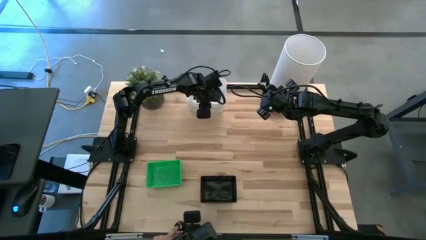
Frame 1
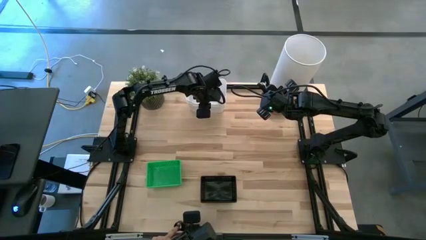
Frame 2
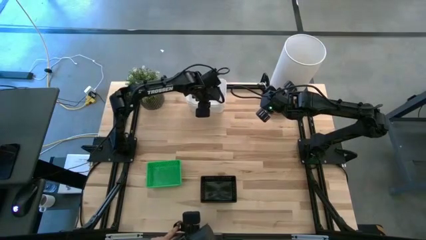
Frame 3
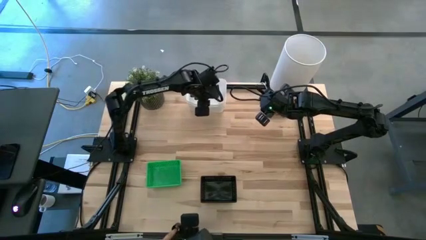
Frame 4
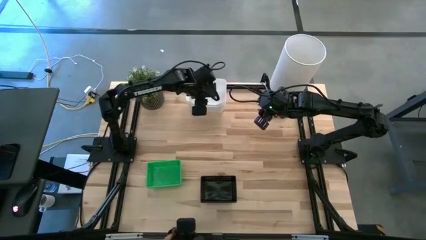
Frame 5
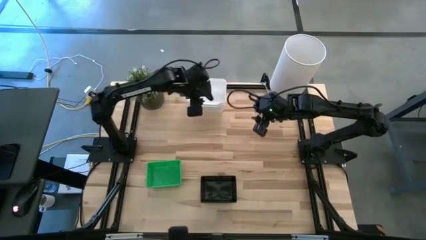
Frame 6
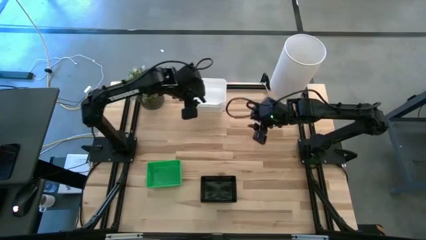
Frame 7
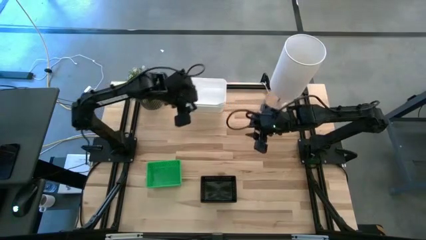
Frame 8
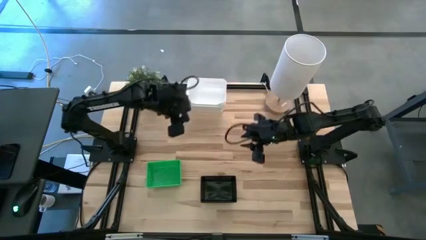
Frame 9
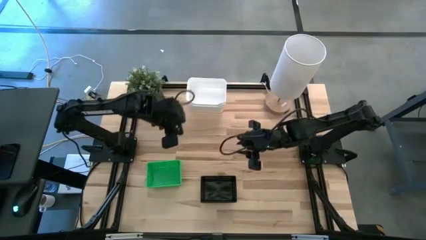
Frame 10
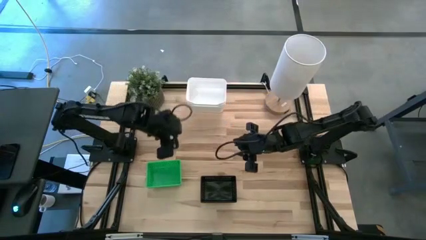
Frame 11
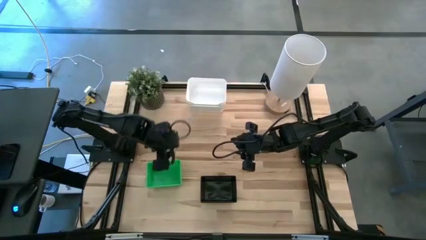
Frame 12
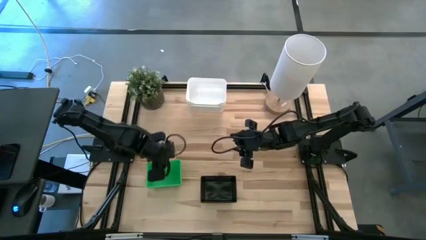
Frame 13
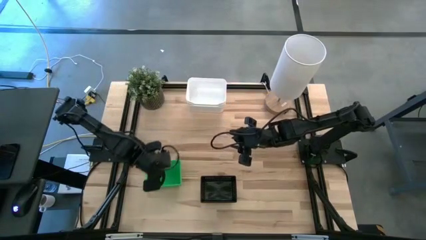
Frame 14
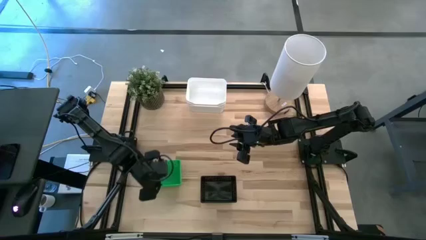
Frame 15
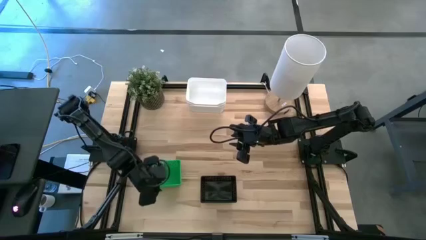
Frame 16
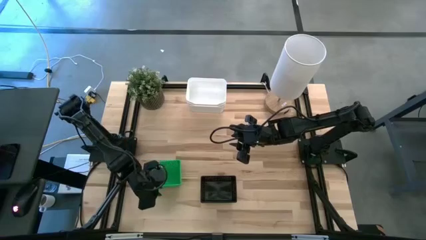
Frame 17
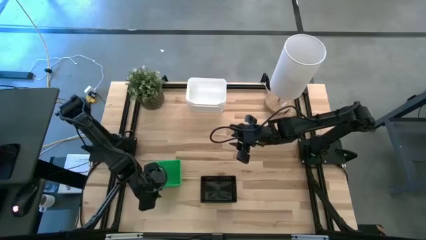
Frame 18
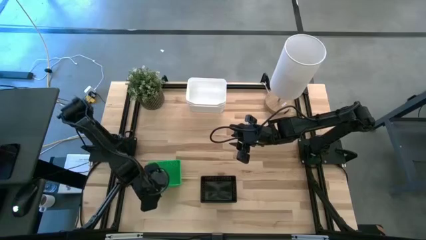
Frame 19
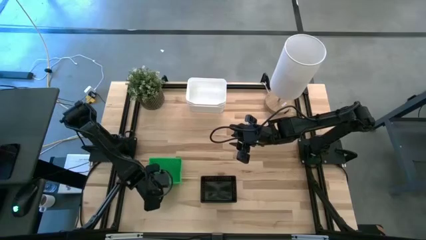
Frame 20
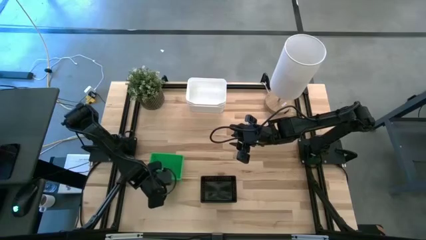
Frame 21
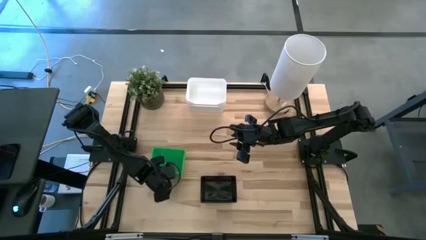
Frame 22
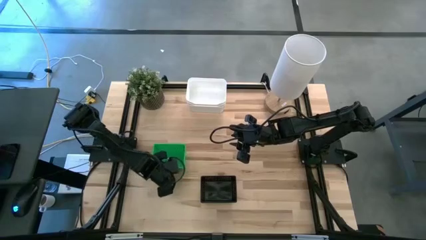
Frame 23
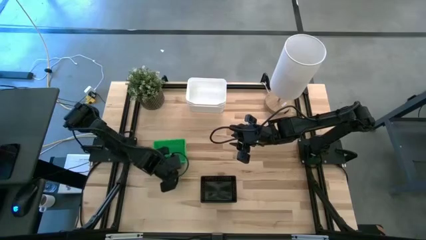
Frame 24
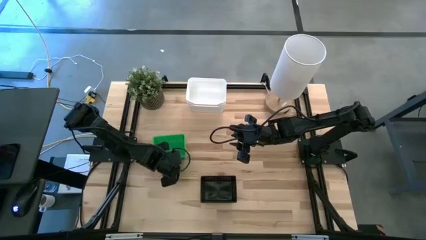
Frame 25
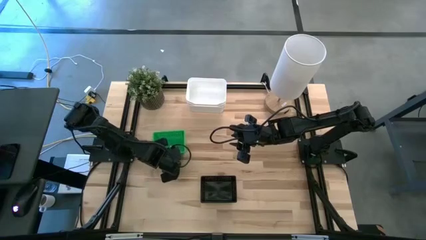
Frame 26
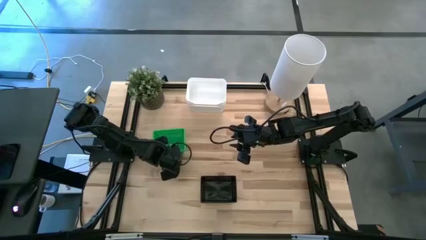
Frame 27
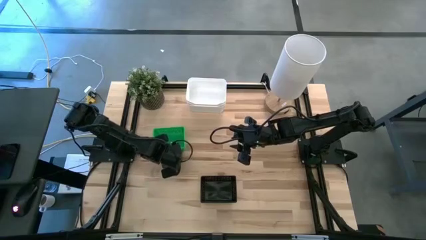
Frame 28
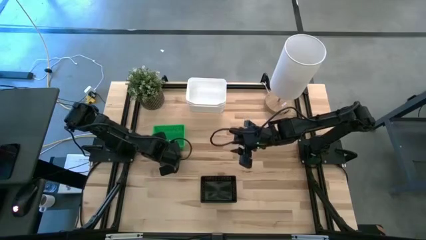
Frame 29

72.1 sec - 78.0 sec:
Move the stacked green bins to the middle left of the table

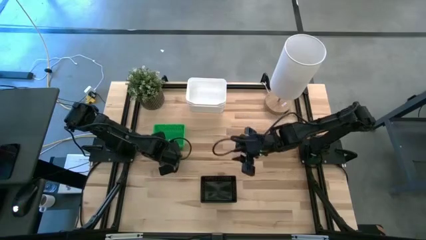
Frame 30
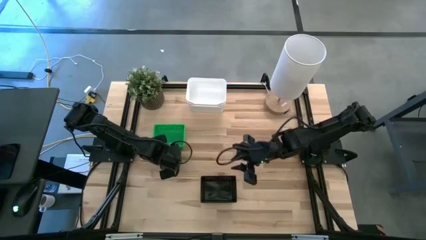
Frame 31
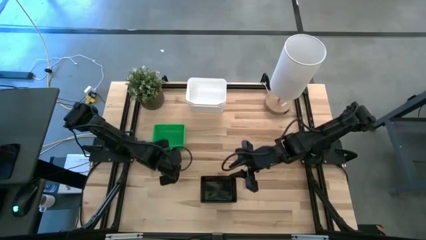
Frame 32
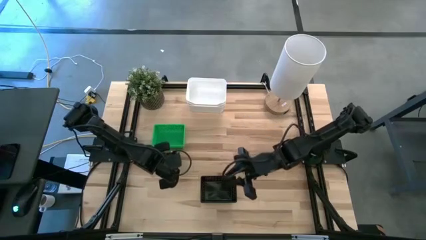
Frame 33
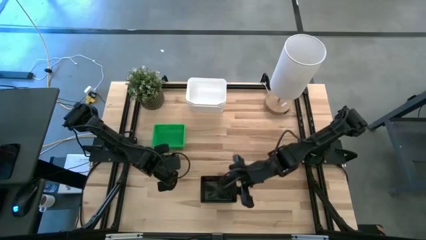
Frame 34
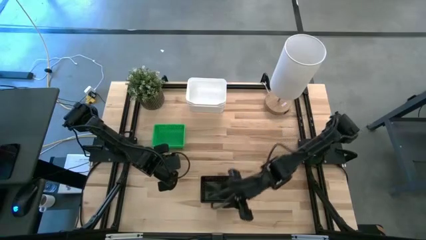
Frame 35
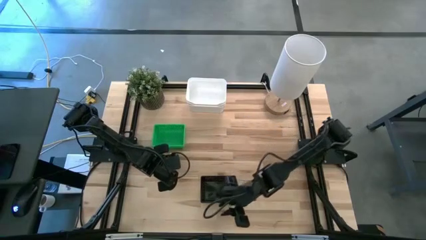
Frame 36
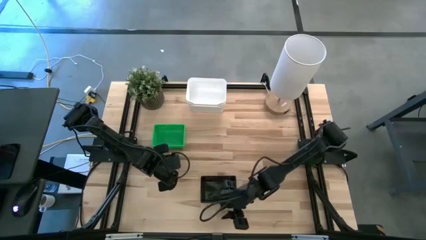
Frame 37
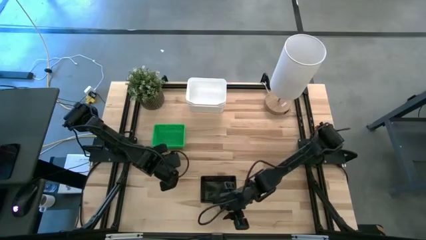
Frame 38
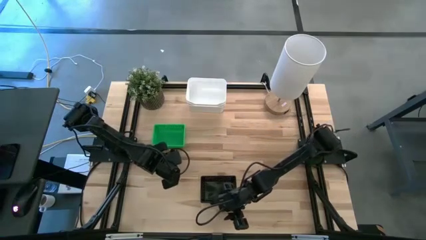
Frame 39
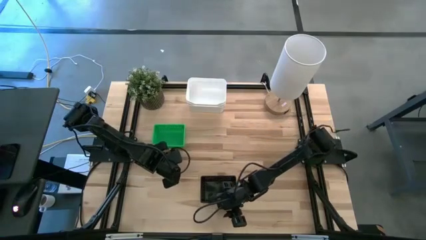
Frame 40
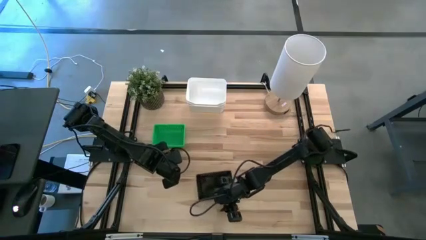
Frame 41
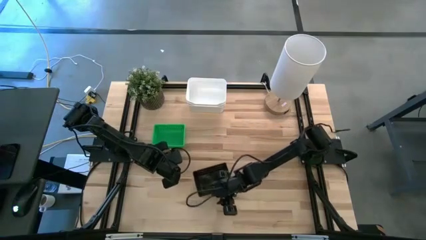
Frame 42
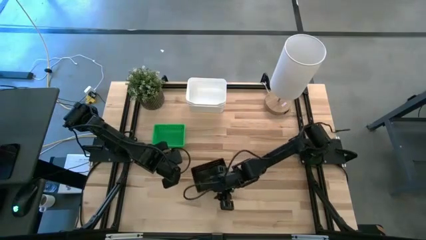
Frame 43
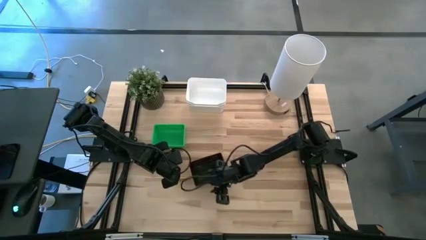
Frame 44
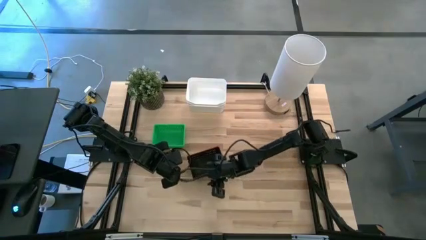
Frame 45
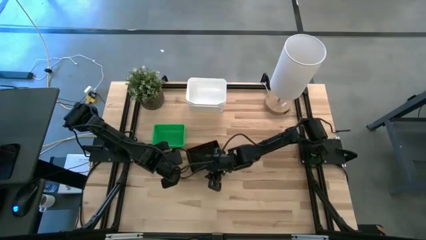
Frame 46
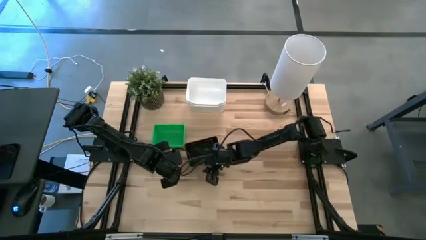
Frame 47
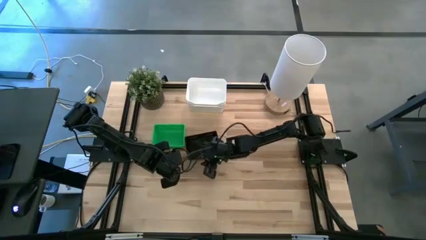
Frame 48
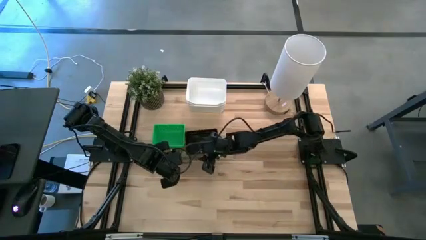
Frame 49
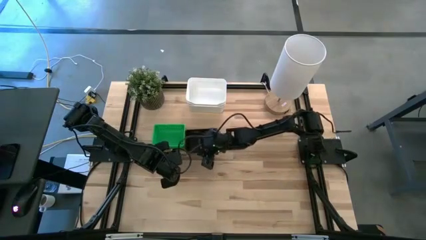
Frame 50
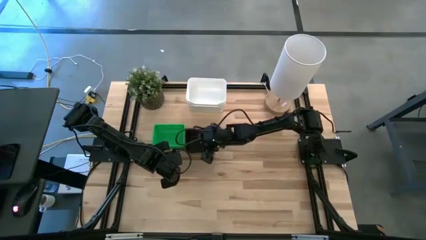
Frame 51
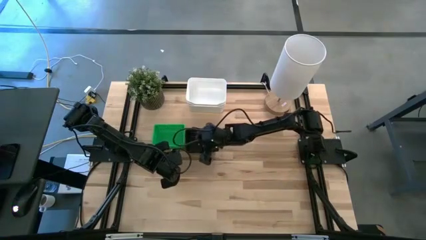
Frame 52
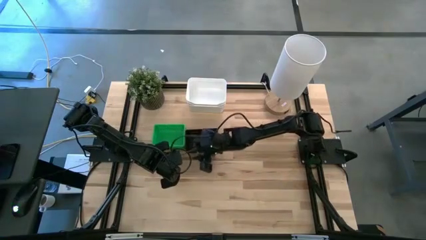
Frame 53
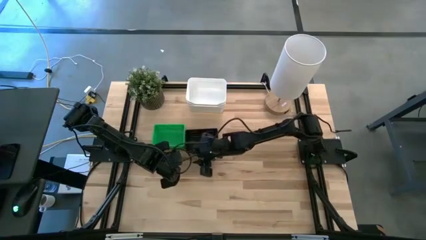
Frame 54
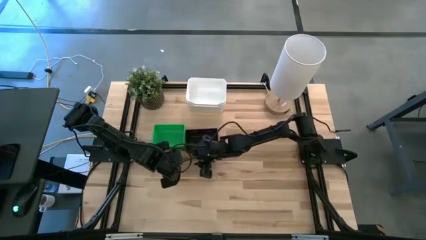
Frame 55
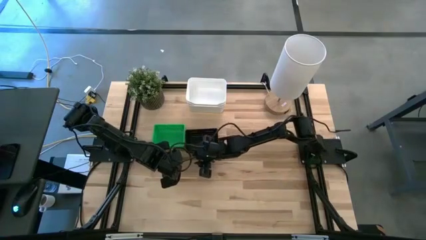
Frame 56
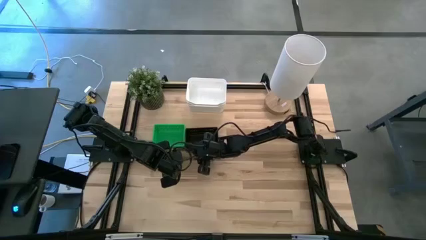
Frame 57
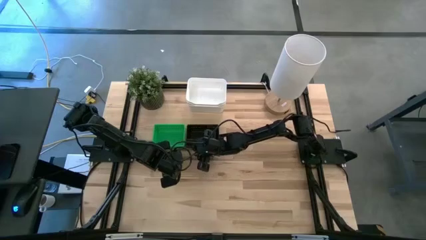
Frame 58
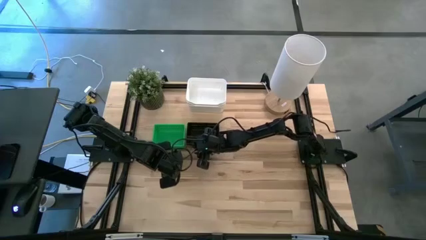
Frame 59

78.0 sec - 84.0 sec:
Move the stacked black bins to the middle left of the table

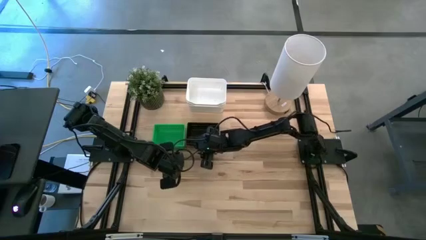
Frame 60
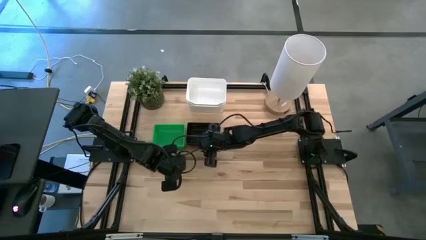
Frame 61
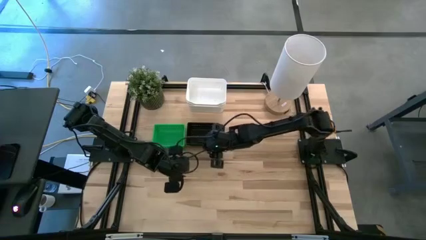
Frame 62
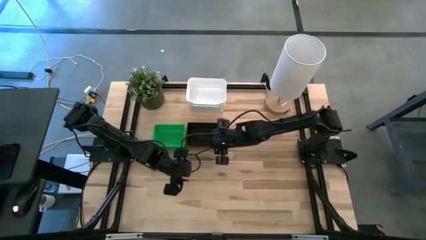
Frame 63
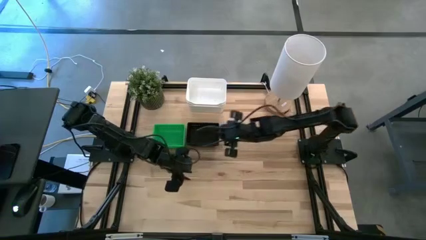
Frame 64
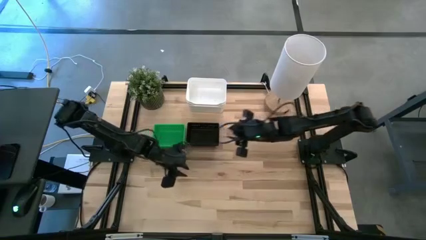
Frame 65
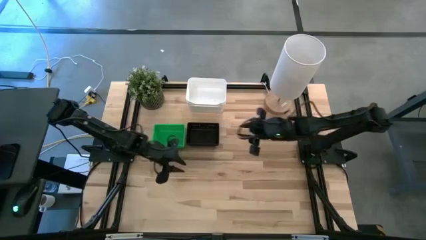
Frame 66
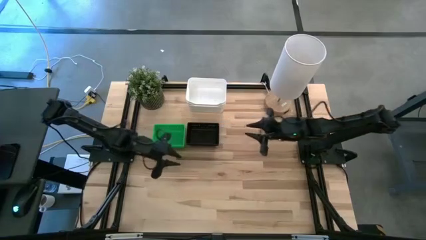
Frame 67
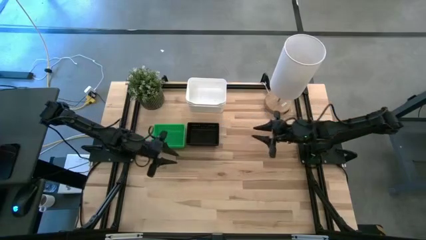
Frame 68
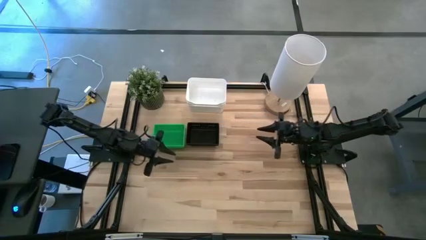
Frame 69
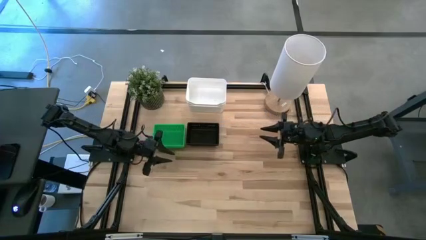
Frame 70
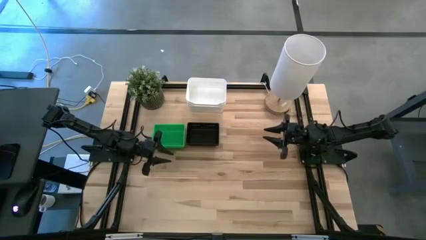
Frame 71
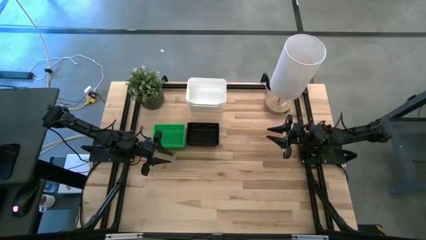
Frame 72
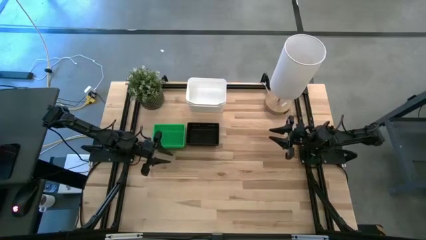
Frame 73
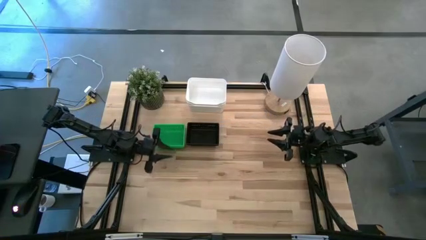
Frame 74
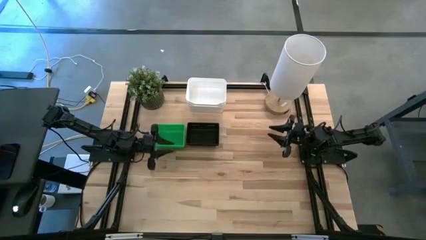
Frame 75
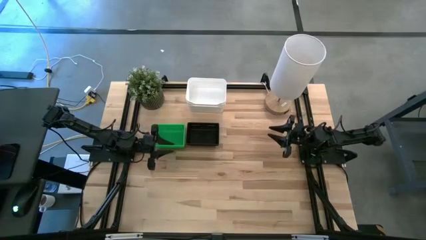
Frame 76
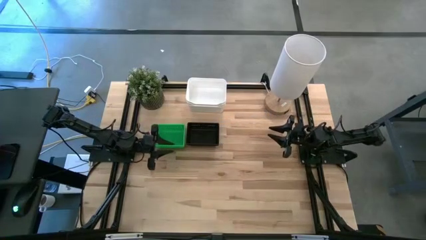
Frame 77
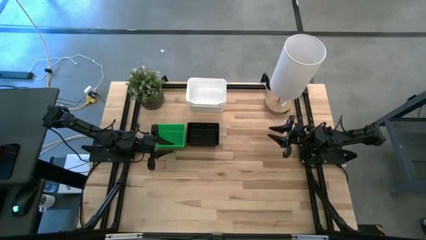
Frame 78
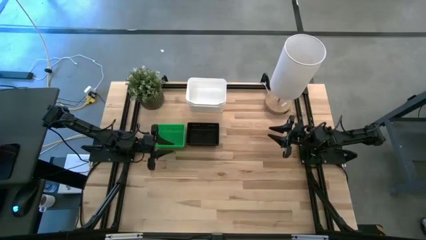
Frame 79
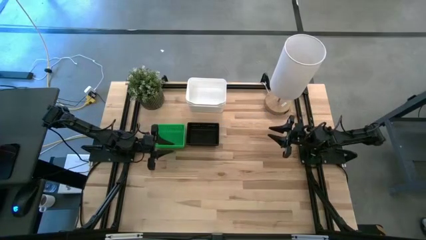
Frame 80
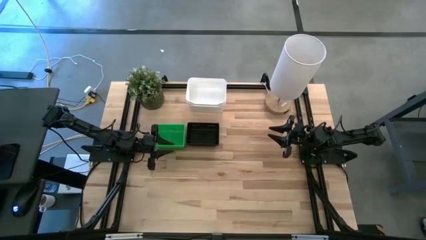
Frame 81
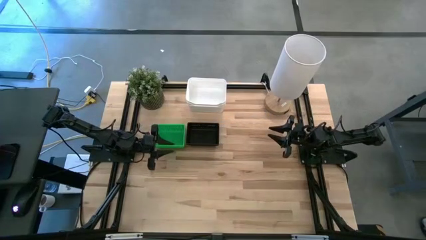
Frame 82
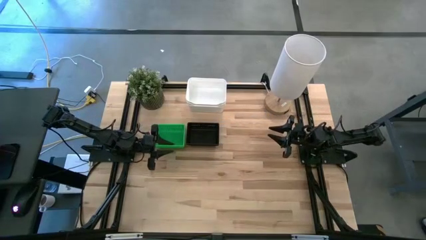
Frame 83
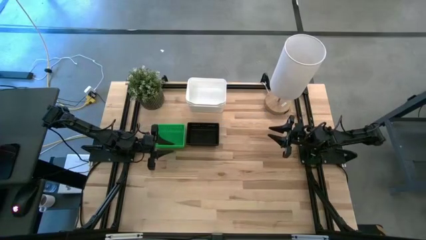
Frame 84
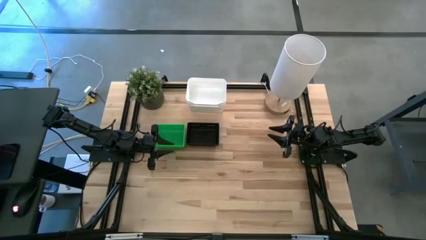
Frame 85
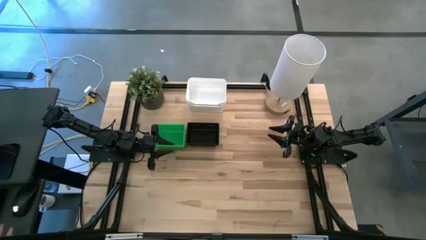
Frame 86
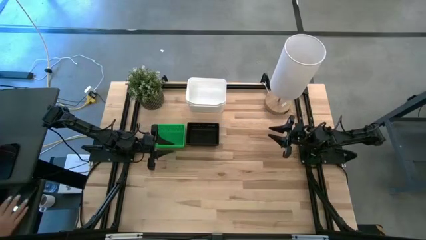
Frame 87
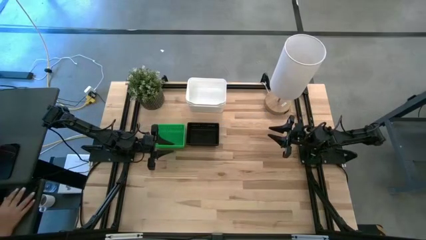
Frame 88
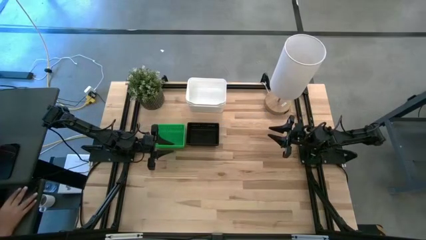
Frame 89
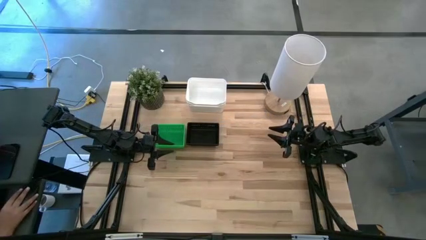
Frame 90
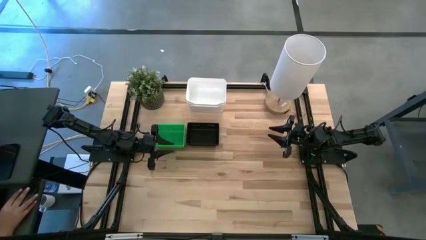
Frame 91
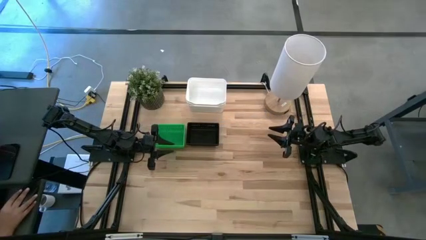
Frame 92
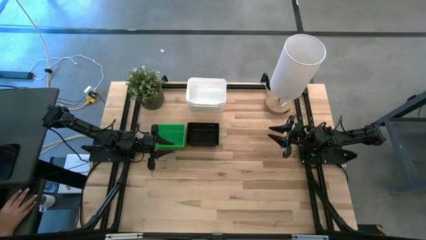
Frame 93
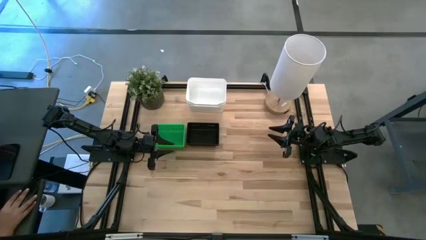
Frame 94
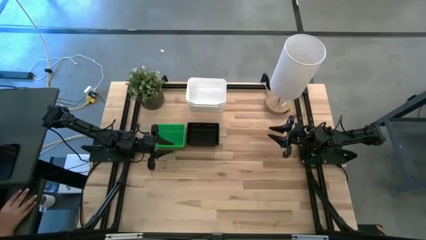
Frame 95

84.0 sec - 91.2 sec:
Return to Home Position
